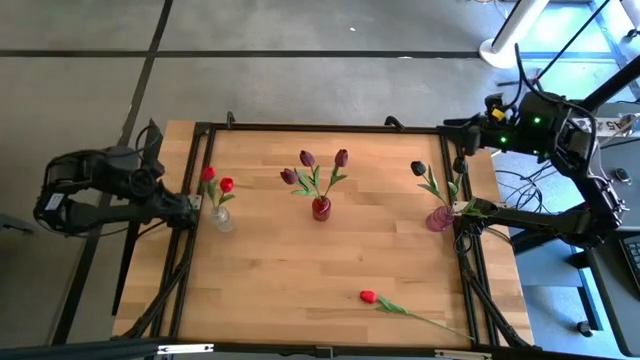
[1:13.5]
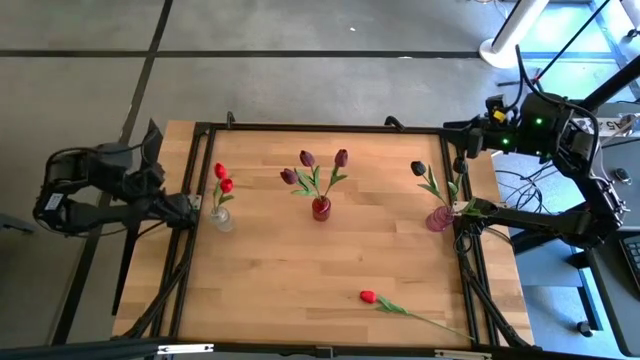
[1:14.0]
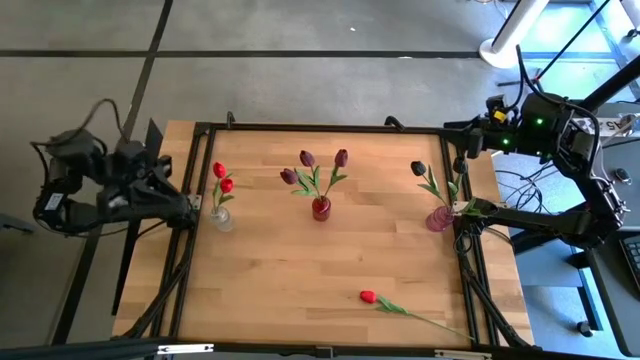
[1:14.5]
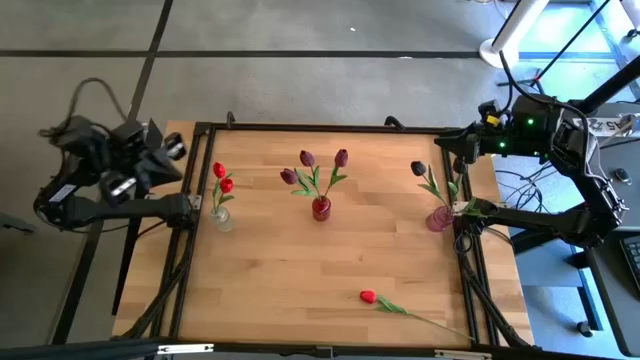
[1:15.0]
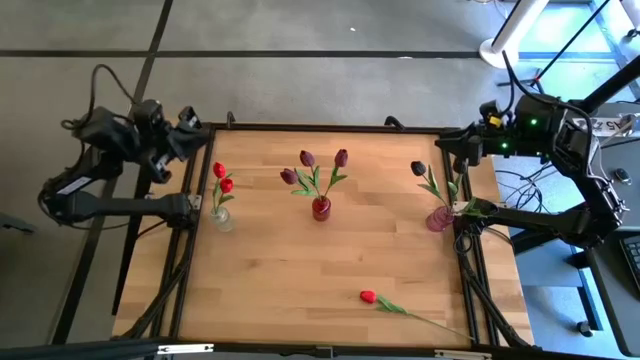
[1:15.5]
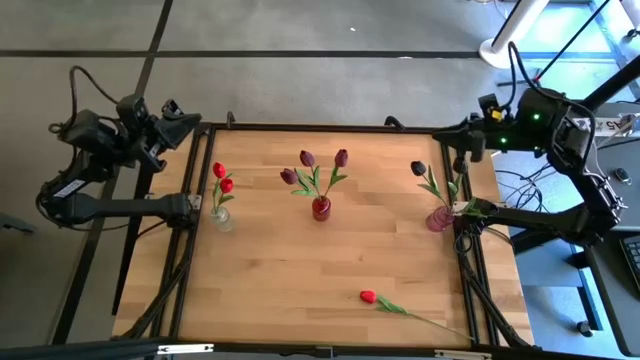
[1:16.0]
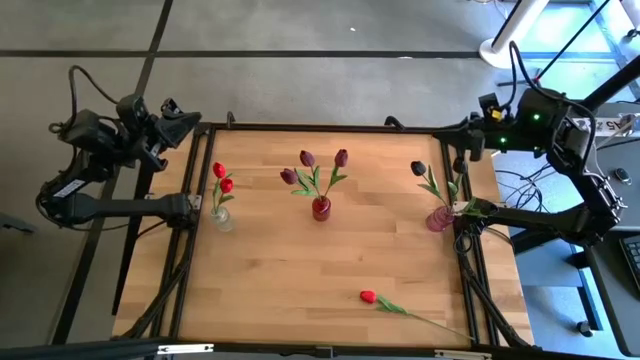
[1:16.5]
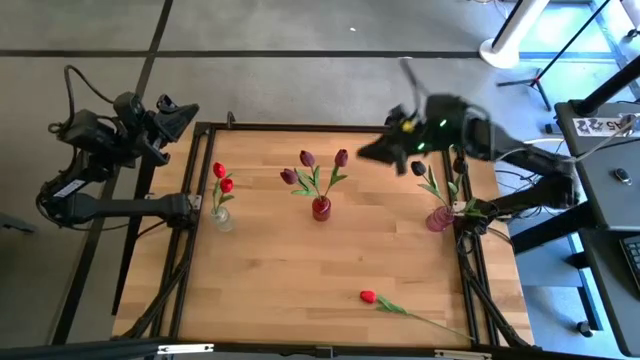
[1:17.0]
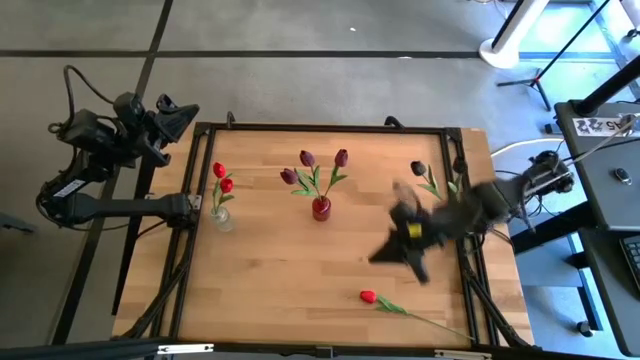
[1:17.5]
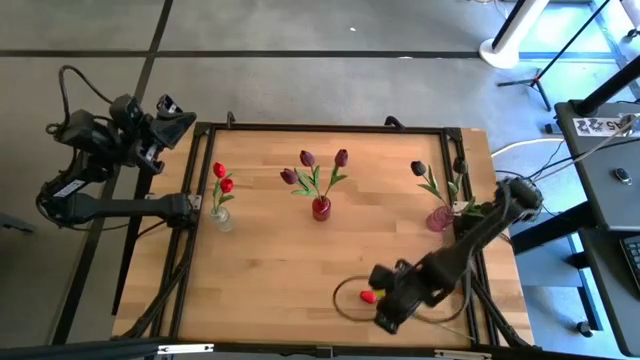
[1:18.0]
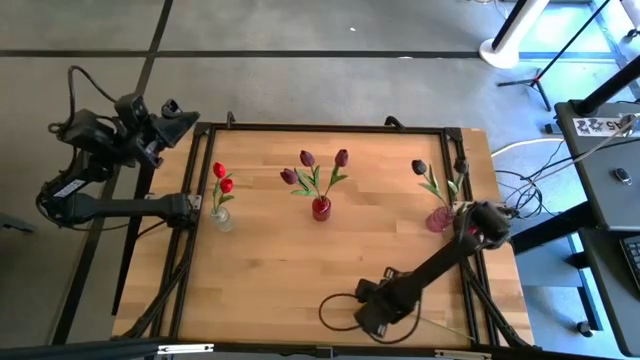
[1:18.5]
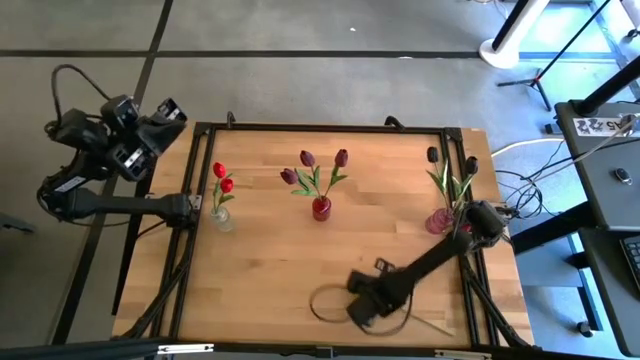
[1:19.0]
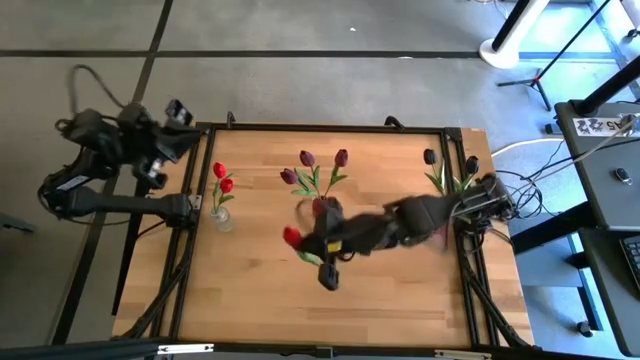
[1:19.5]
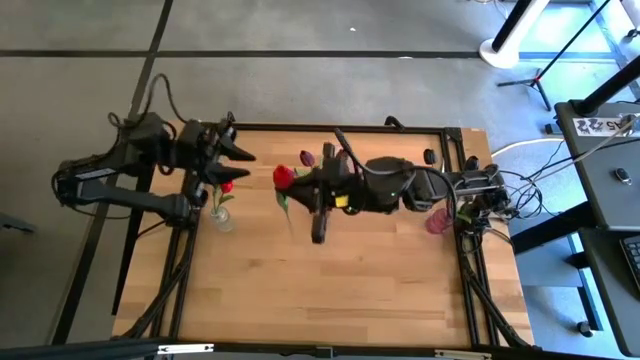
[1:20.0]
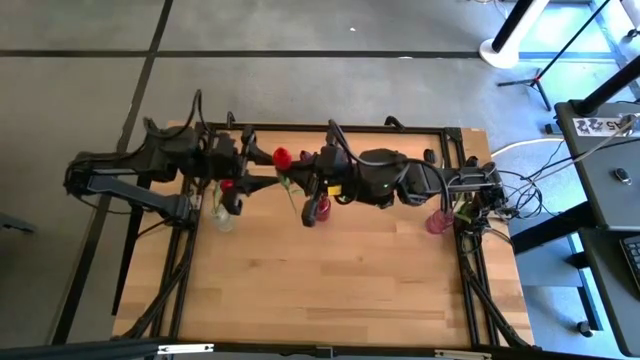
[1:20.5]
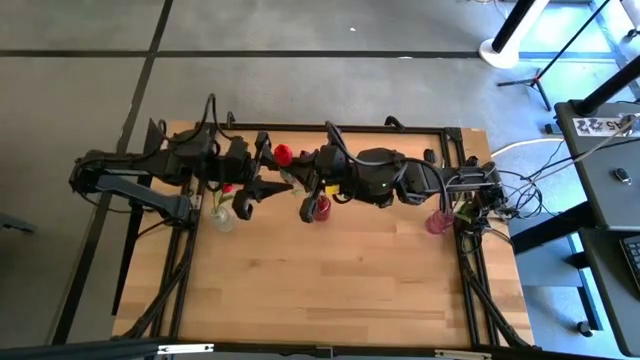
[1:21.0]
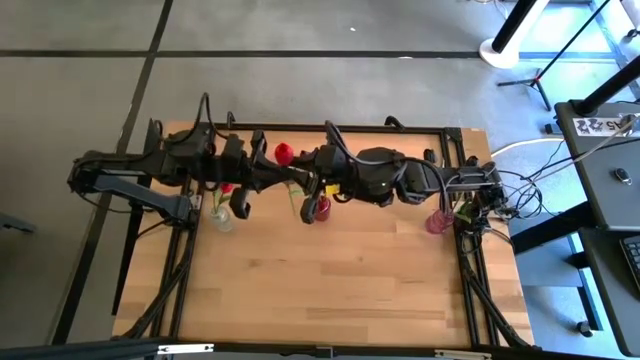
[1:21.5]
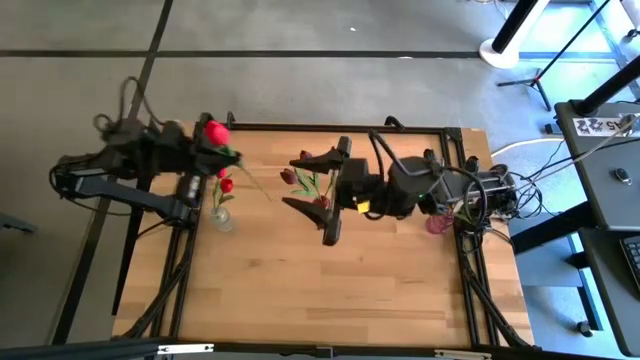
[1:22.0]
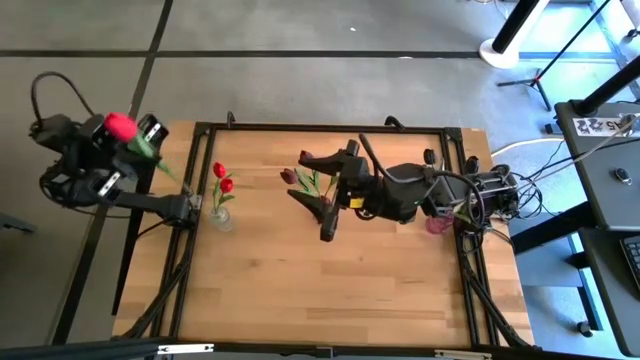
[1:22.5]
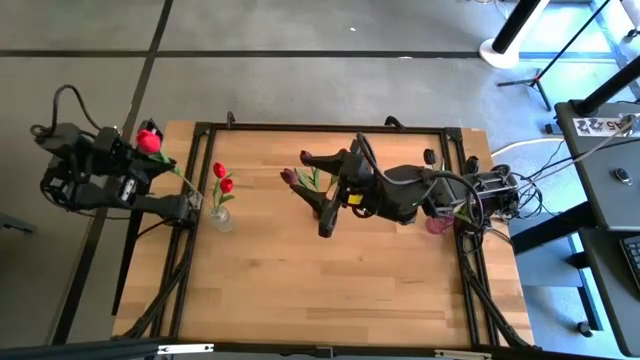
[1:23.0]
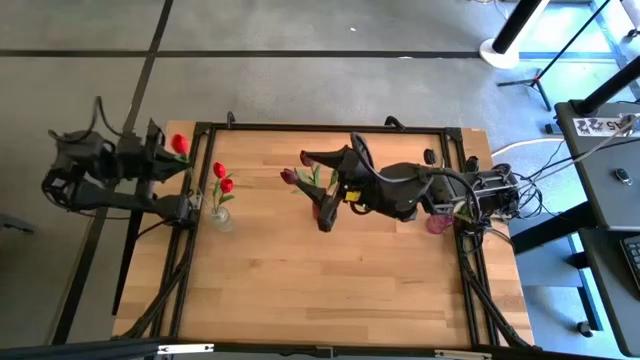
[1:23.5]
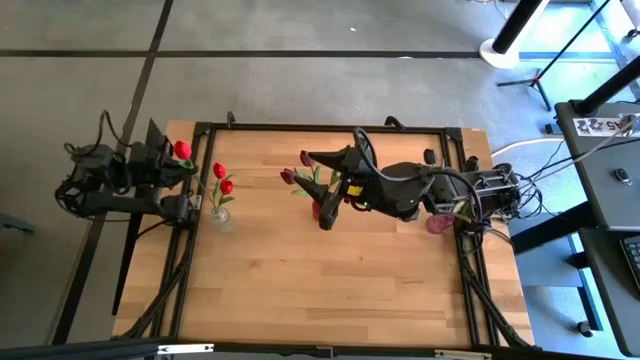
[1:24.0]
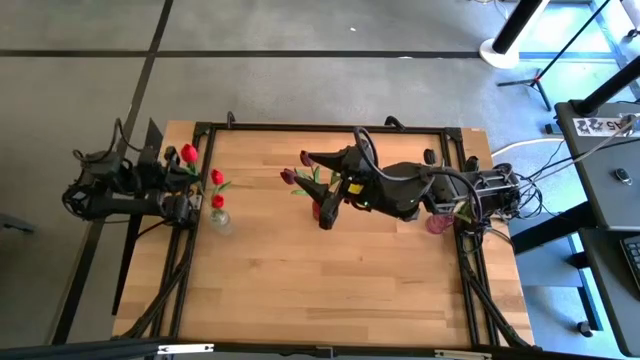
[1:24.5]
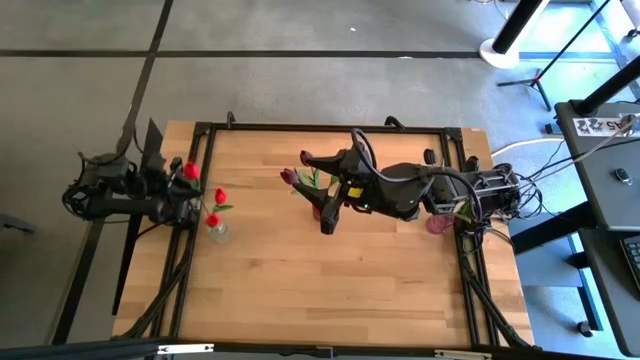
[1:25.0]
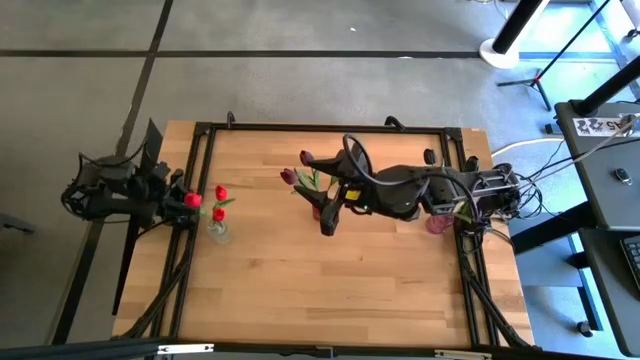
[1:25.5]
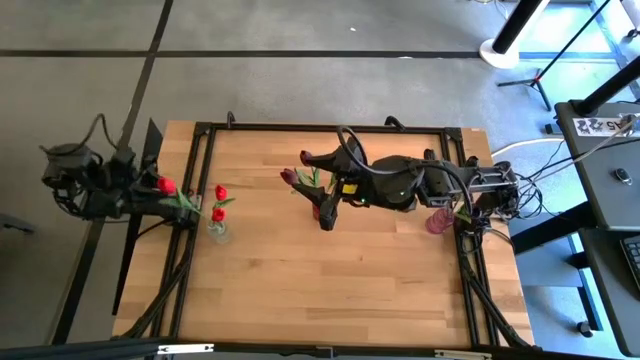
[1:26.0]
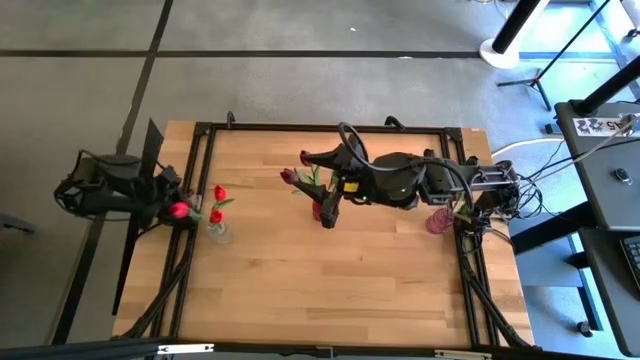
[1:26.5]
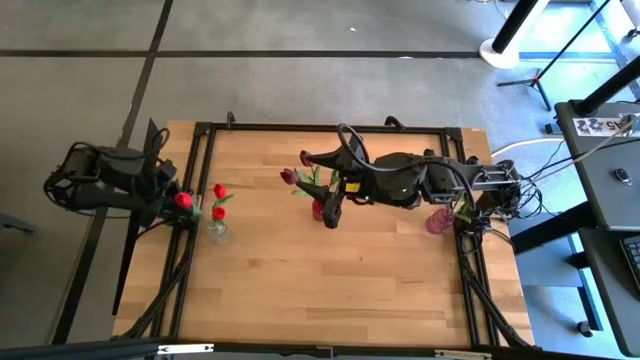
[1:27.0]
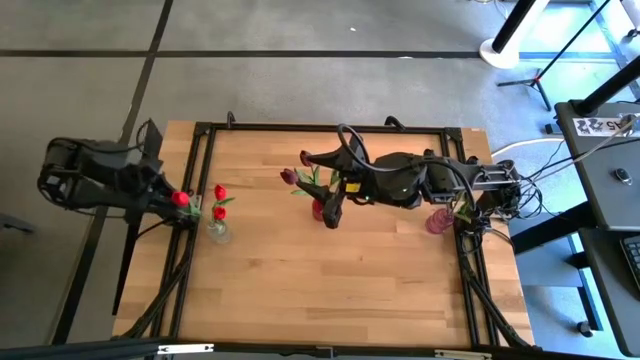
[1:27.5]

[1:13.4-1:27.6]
Task: Sort flowers into vase by color
Put the red tulip into the white vase

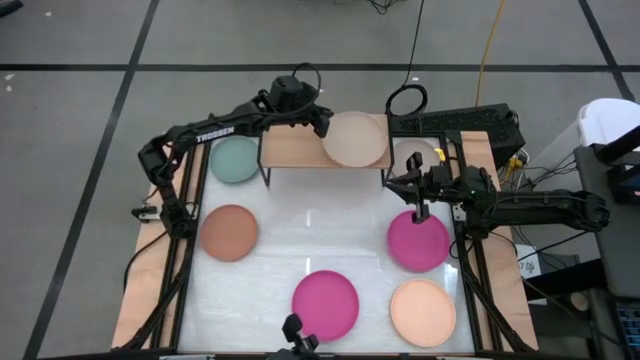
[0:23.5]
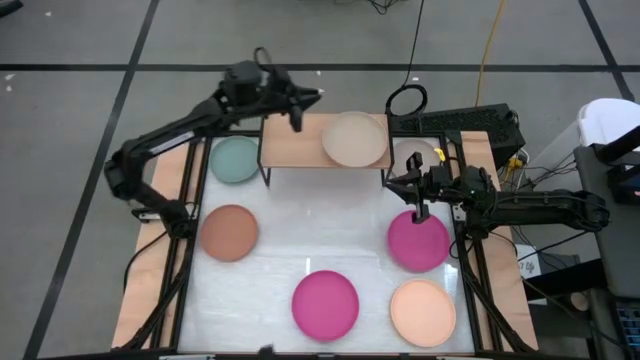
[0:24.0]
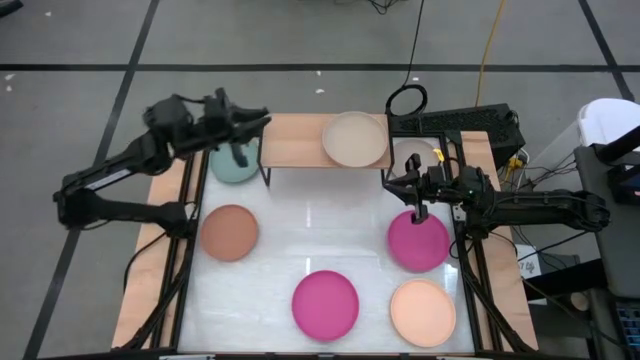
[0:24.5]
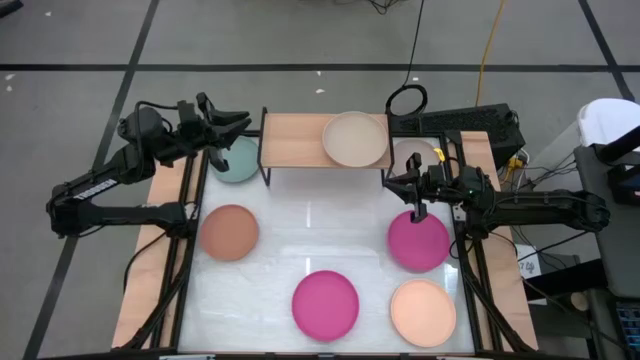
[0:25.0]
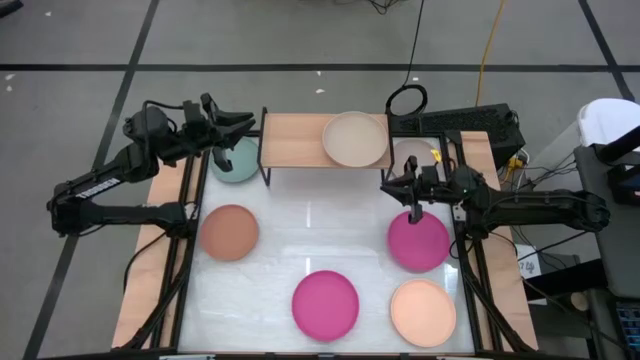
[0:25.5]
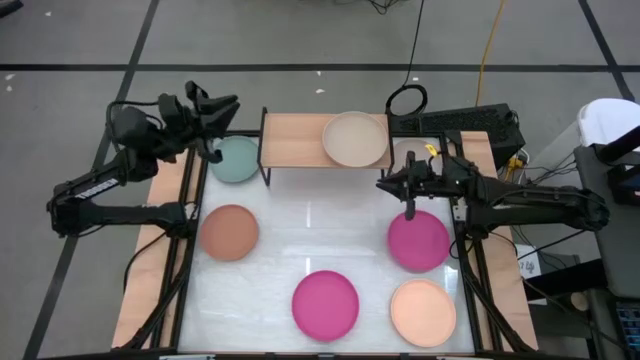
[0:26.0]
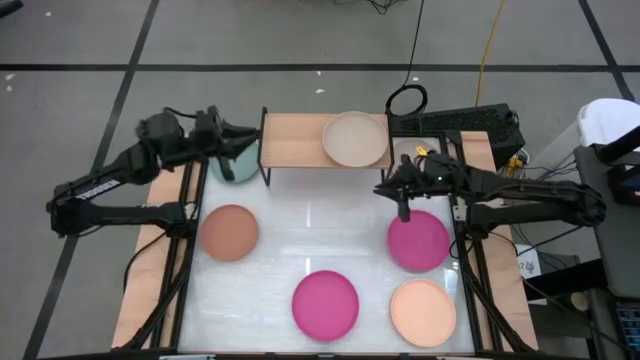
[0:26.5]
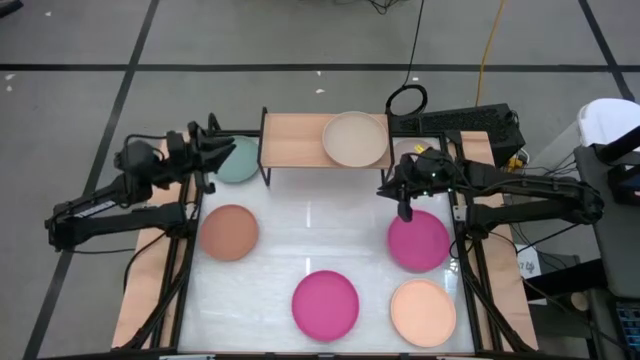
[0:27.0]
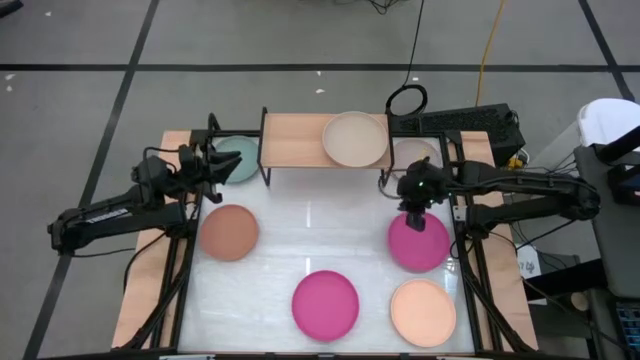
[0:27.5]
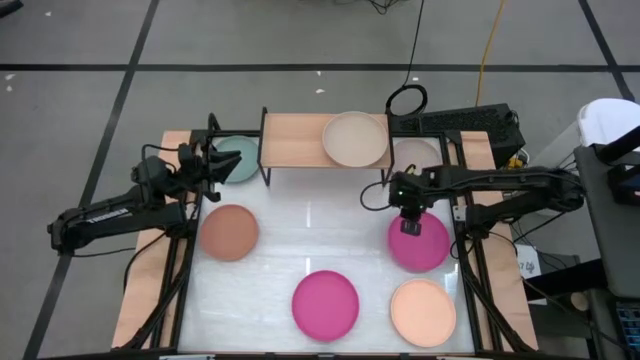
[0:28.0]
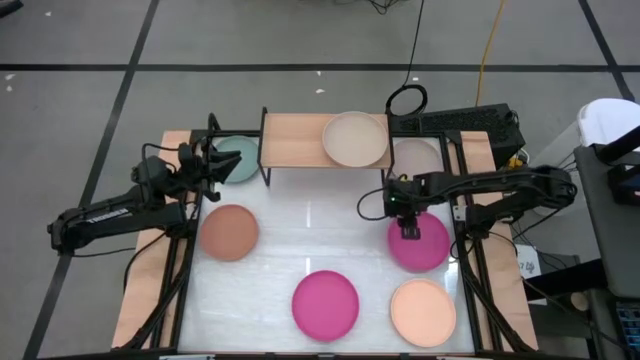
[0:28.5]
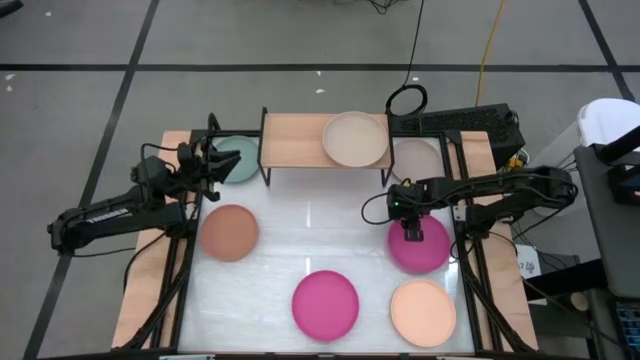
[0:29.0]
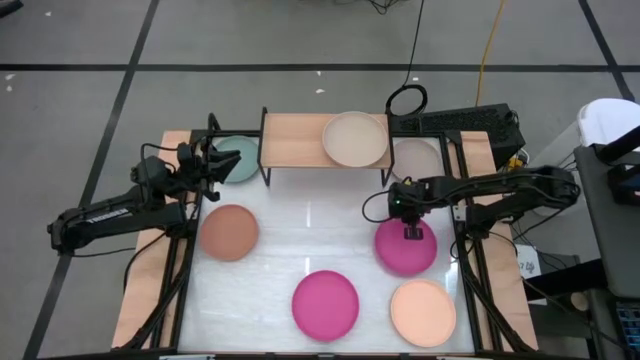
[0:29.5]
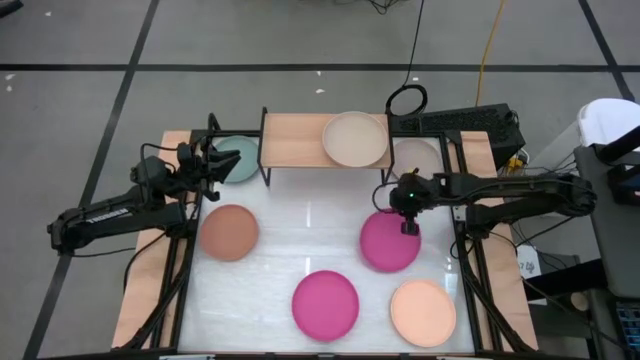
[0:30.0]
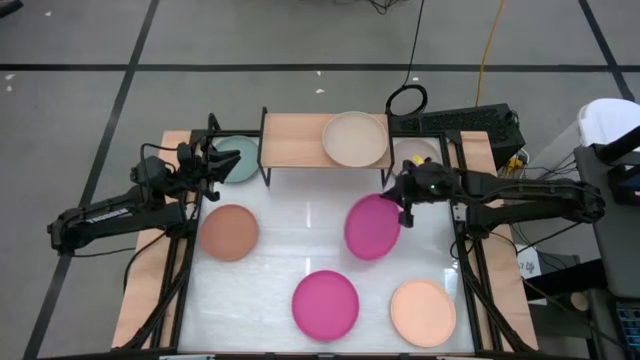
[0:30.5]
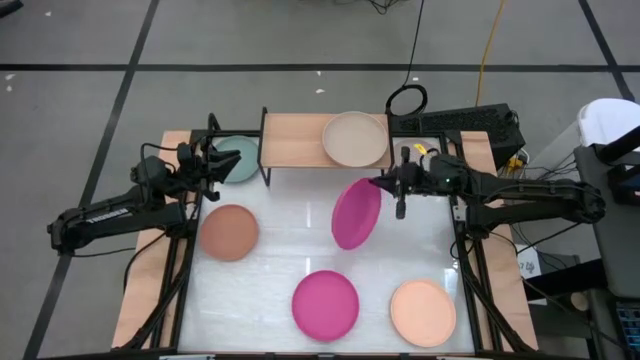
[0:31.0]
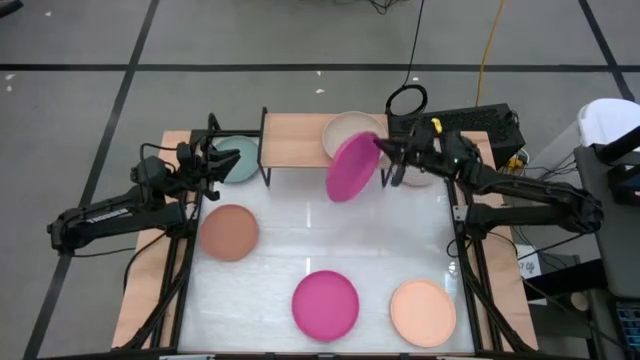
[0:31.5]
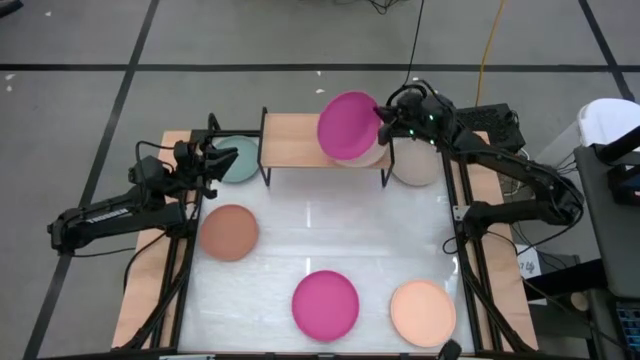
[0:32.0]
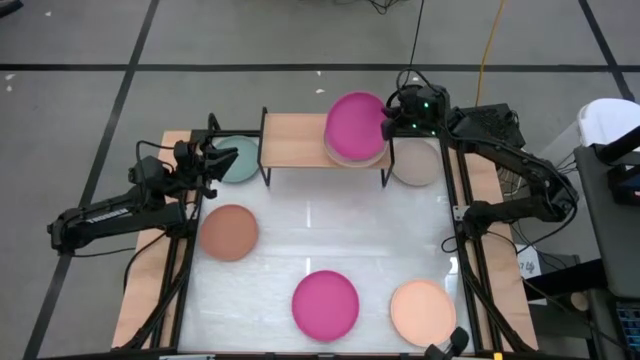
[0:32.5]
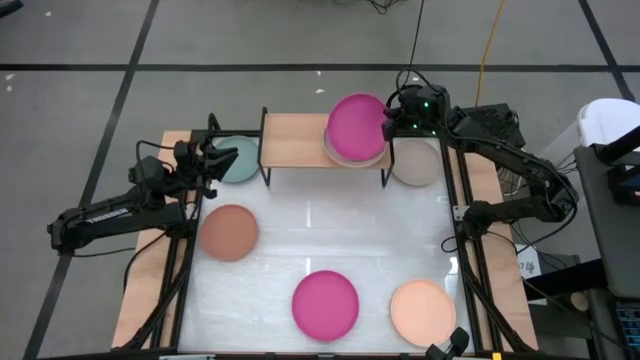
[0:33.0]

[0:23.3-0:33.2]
Task: Place and stack plates onto a shelf
Stack the top pink plate on top of the the light brown plate on the shelf
